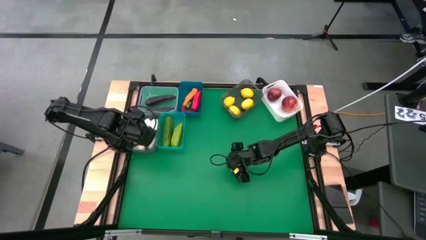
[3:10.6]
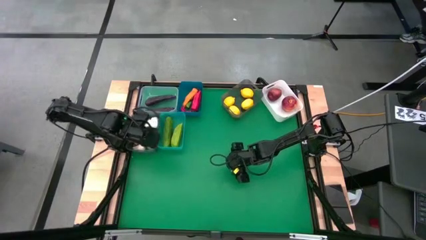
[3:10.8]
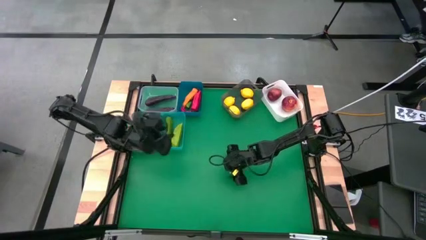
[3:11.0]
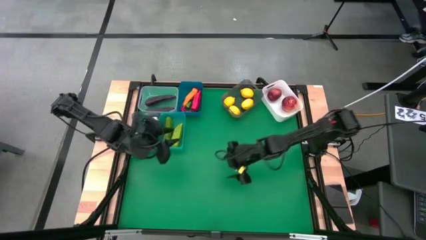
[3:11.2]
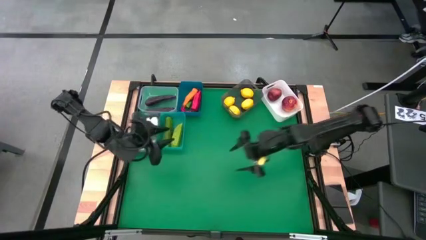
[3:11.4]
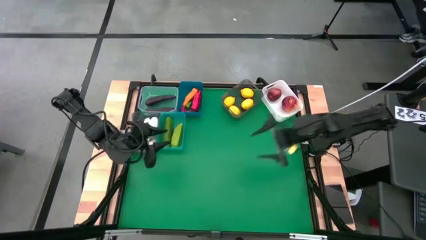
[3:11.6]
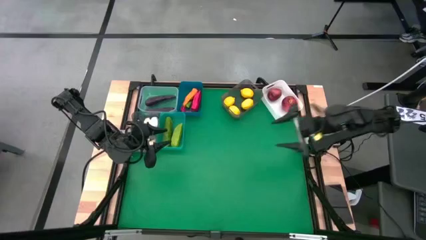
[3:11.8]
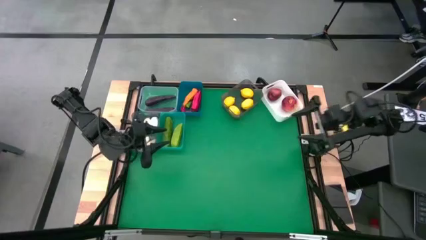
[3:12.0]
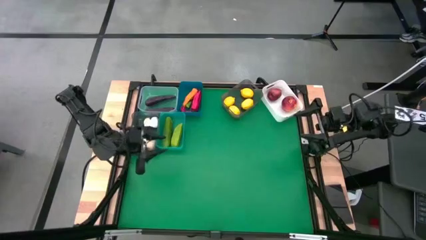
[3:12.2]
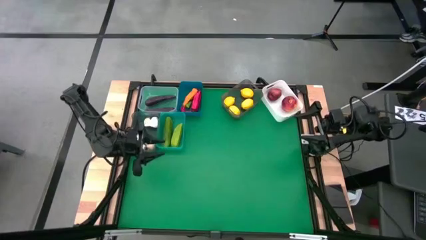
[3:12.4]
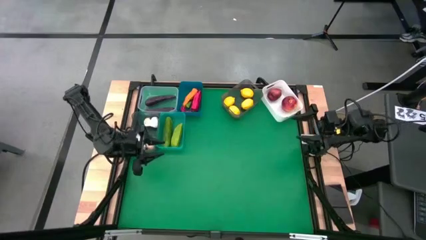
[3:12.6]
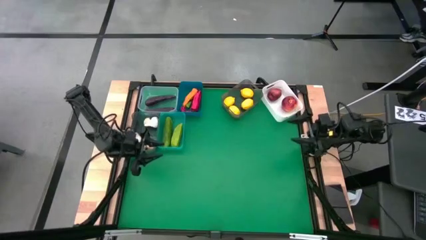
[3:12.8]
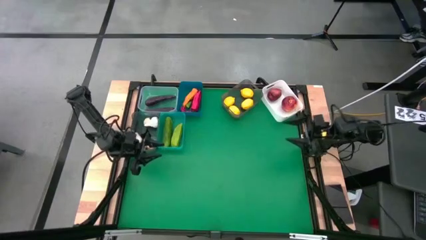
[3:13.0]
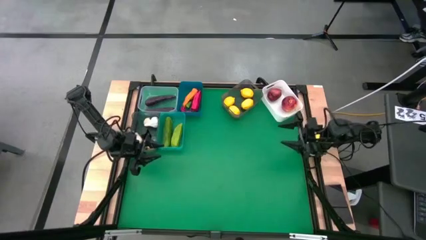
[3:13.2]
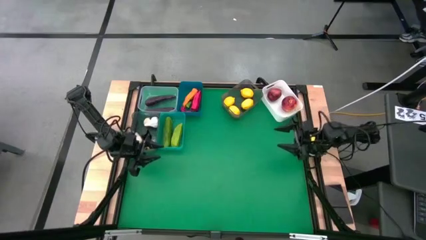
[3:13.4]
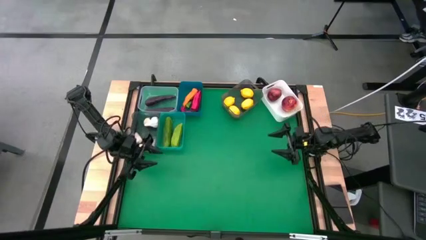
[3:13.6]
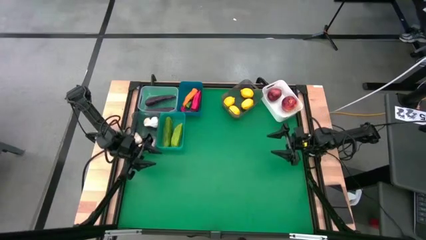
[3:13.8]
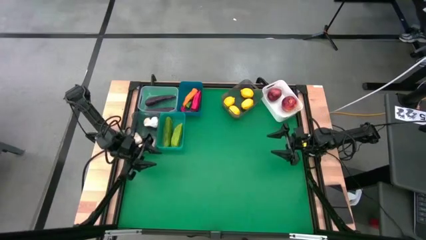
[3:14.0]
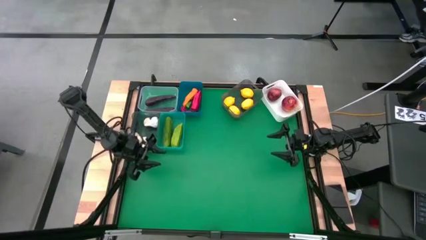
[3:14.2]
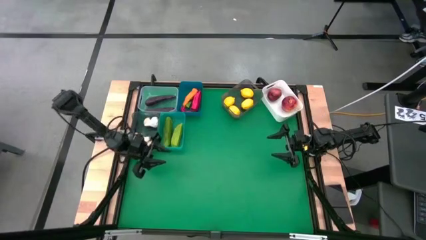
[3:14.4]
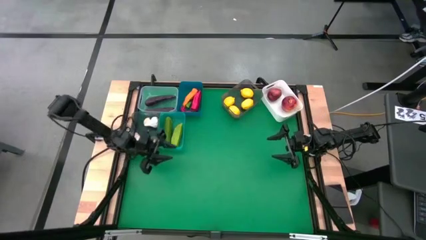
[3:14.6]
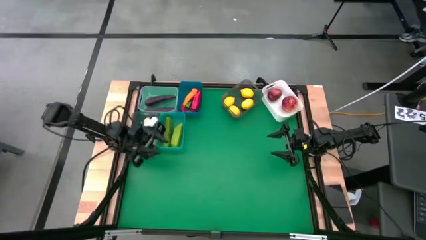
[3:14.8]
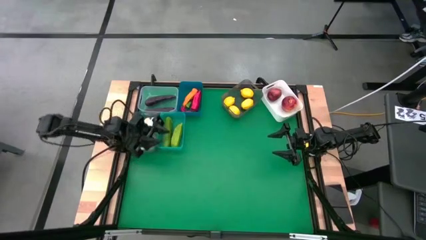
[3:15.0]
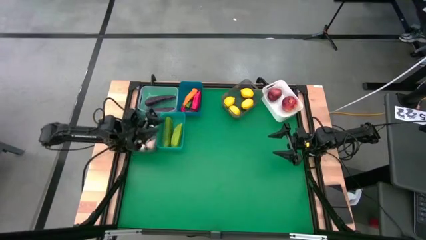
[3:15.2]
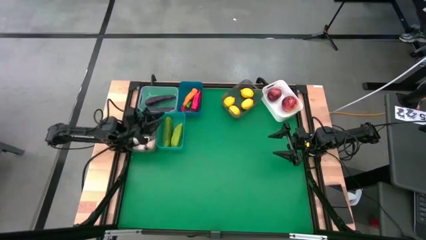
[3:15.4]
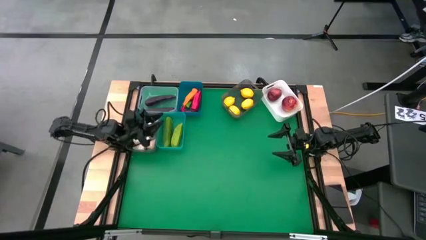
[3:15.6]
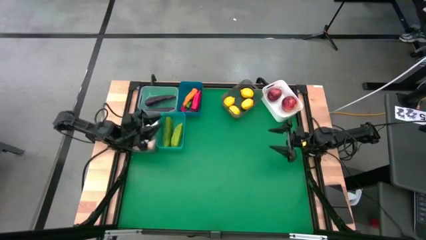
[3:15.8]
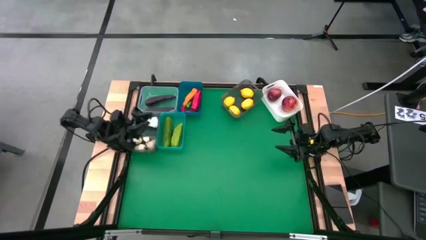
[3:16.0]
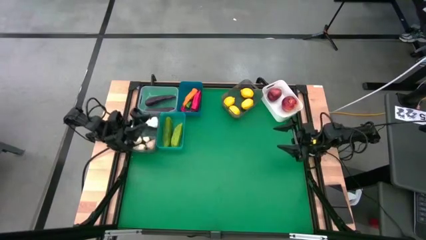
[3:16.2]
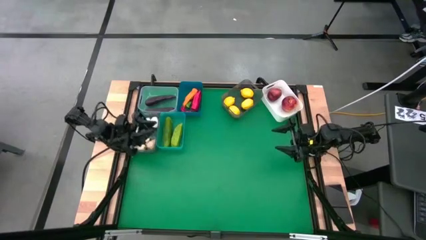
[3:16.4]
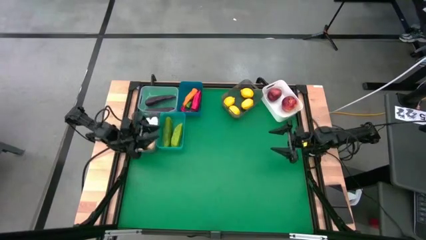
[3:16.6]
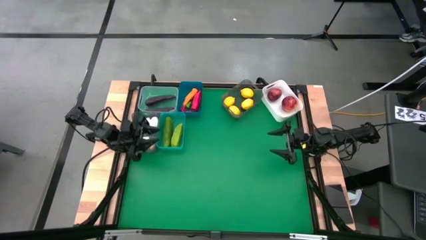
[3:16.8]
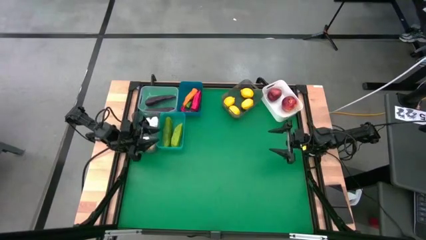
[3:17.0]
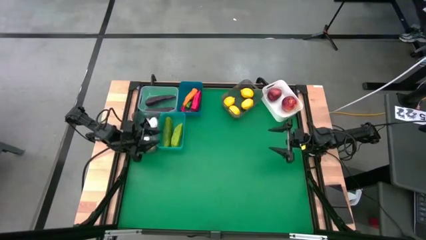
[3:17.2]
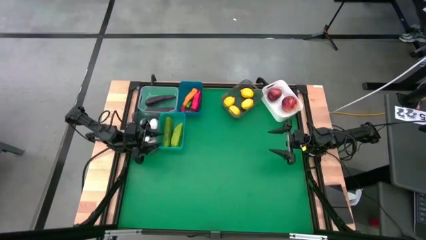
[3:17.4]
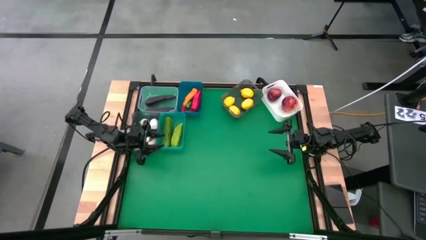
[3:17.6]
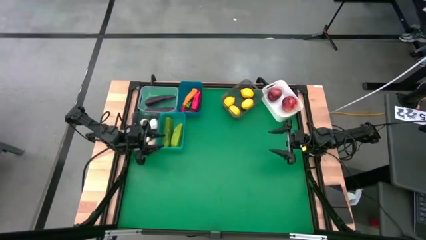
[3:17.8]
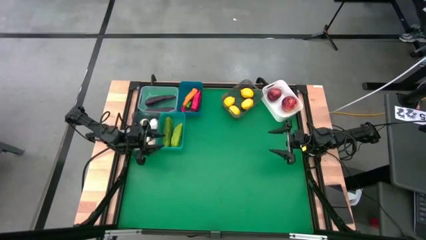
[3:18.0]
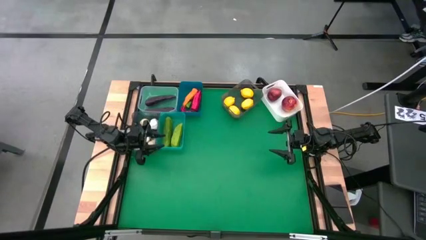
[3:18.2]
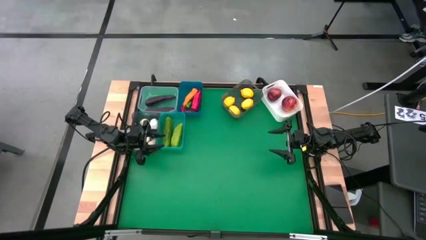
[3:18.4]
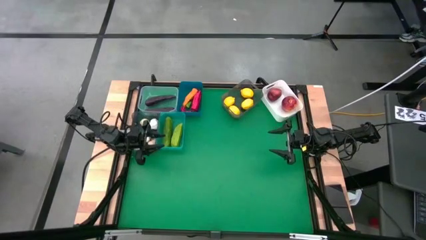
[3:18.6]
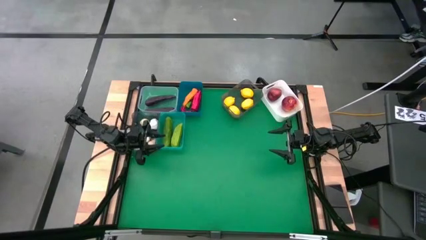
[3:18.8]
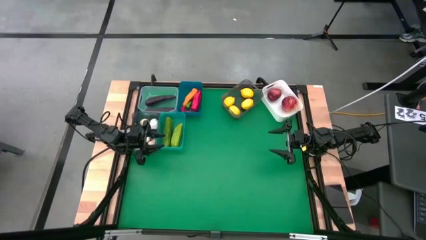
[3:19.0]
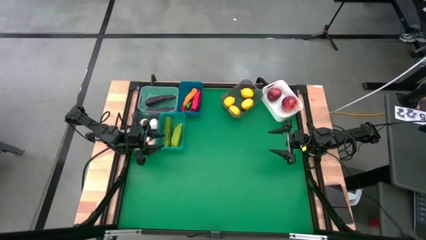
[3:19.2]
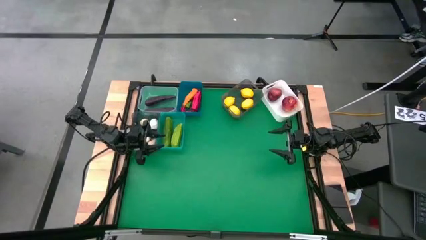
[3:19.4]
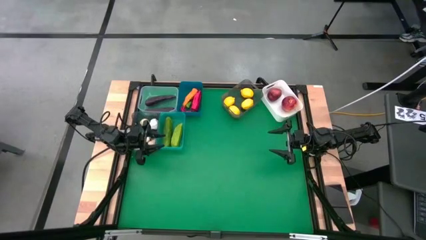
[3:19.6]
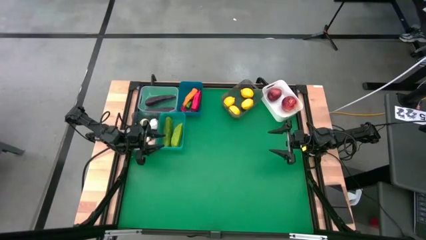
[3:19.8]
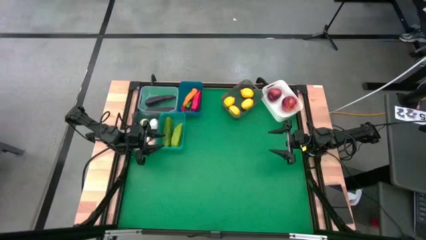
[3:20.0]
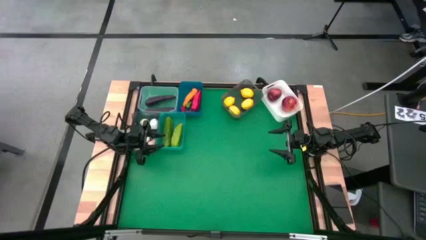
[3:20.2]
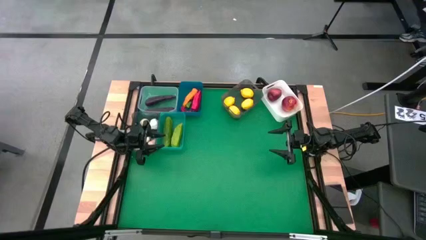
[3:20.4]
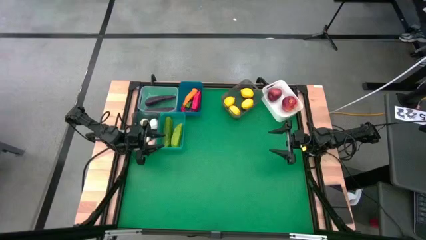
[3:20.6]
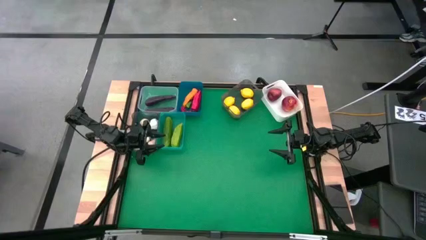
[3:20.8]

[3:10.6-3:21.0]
Task: Sort produce into baskets
Return to Home Position

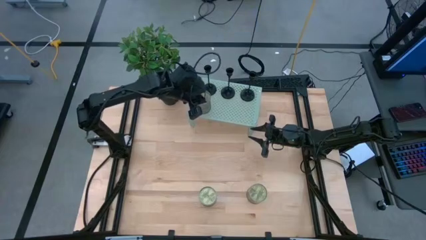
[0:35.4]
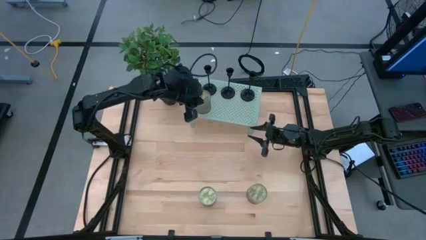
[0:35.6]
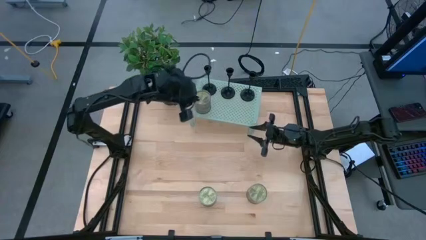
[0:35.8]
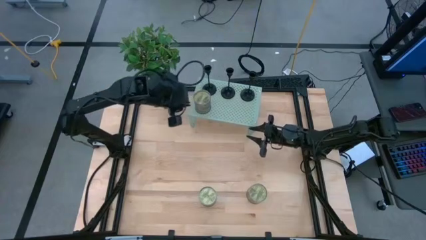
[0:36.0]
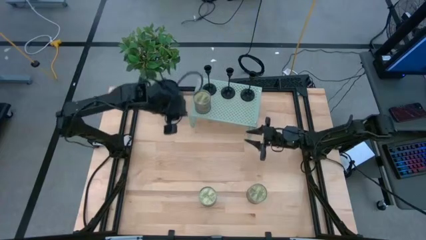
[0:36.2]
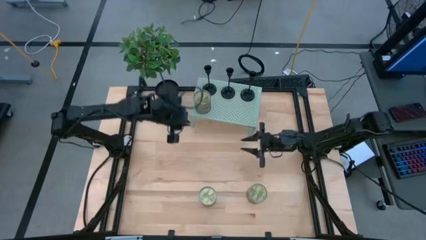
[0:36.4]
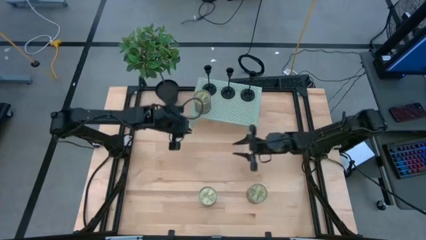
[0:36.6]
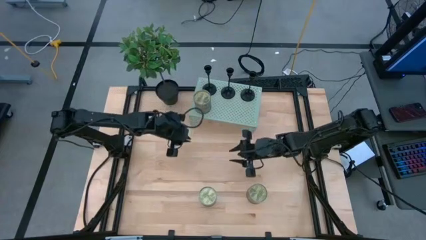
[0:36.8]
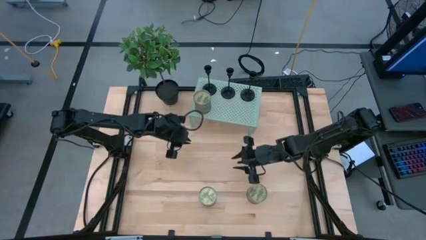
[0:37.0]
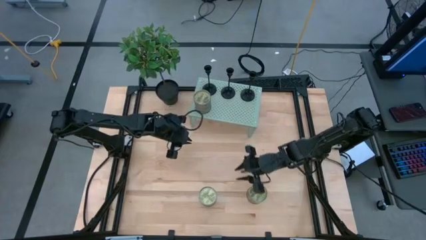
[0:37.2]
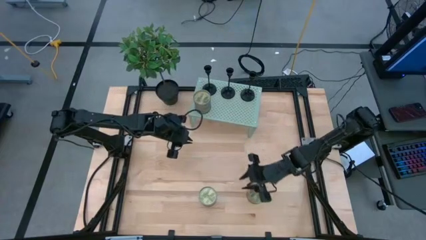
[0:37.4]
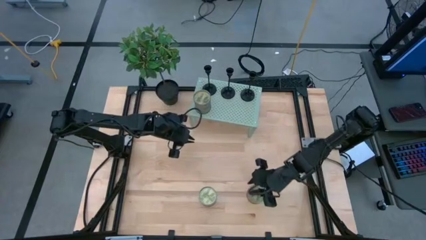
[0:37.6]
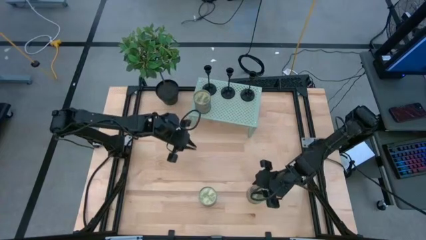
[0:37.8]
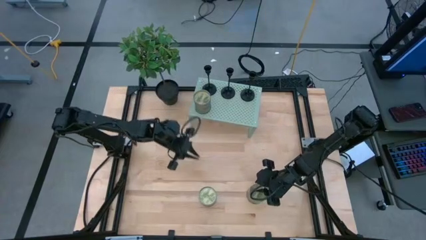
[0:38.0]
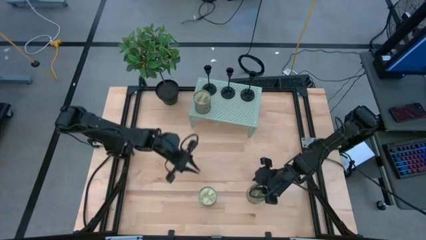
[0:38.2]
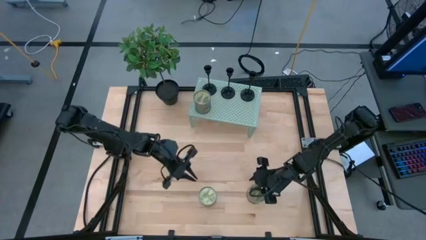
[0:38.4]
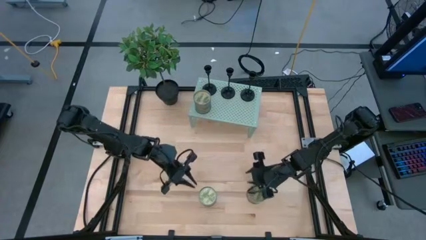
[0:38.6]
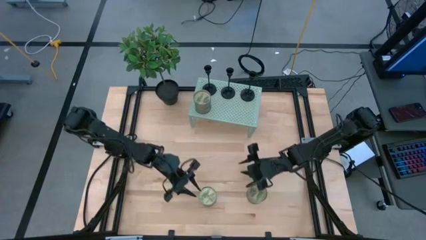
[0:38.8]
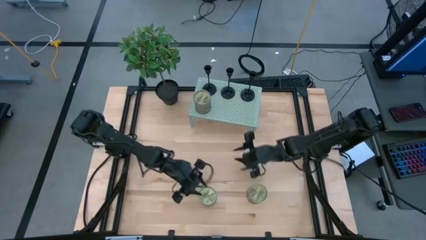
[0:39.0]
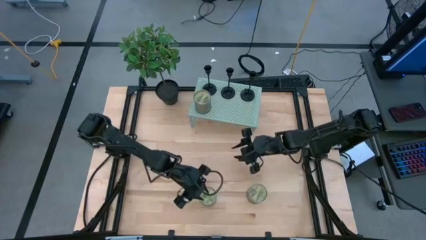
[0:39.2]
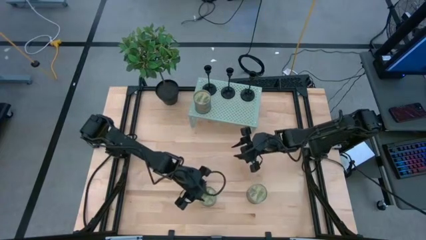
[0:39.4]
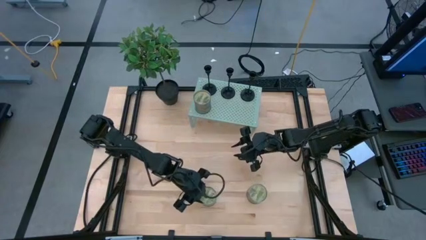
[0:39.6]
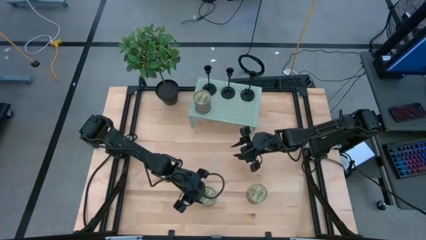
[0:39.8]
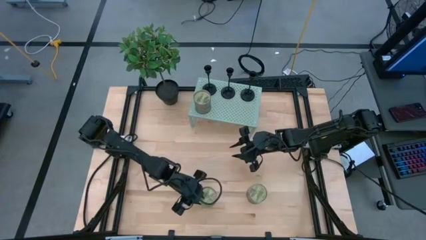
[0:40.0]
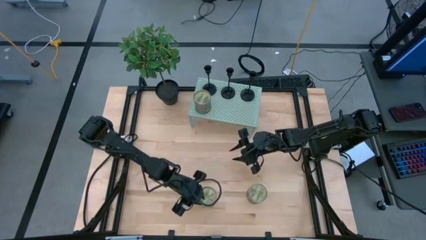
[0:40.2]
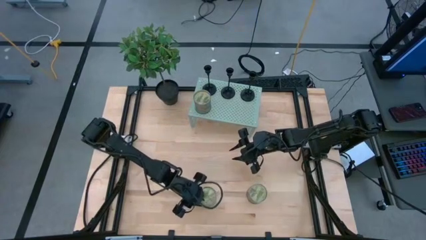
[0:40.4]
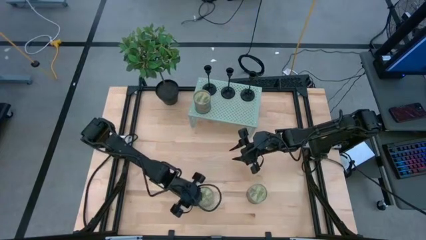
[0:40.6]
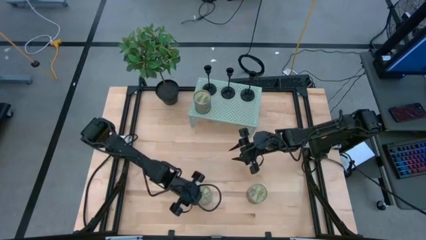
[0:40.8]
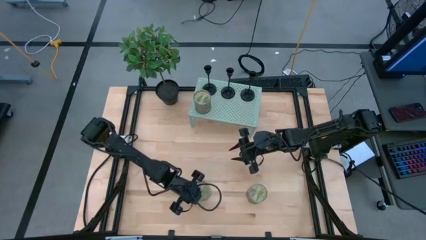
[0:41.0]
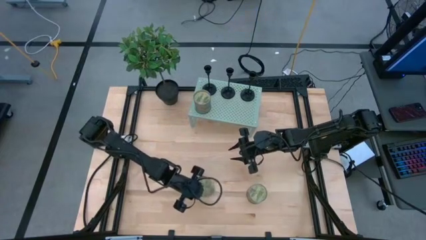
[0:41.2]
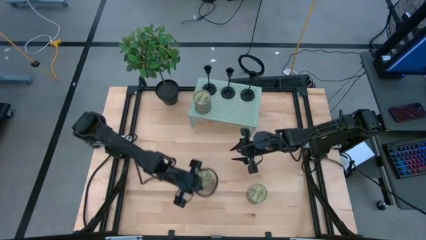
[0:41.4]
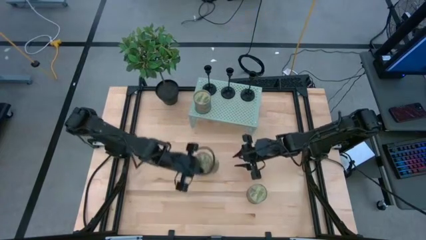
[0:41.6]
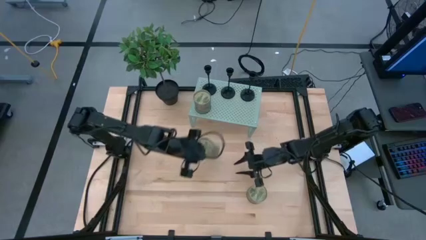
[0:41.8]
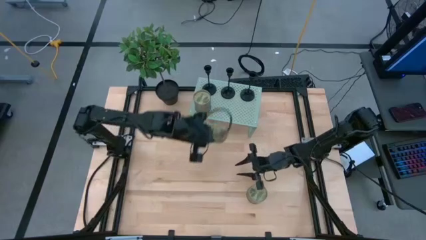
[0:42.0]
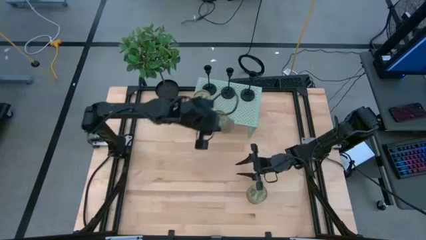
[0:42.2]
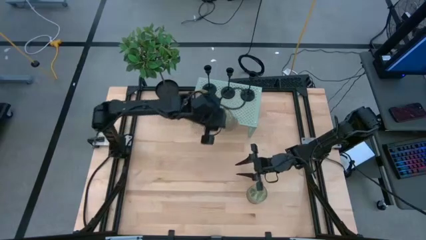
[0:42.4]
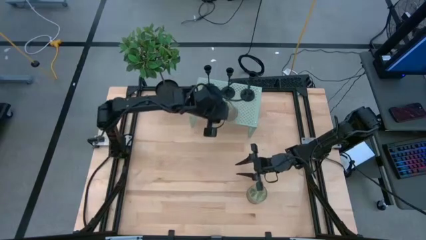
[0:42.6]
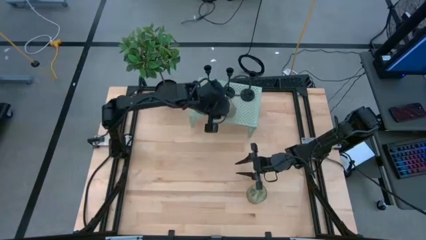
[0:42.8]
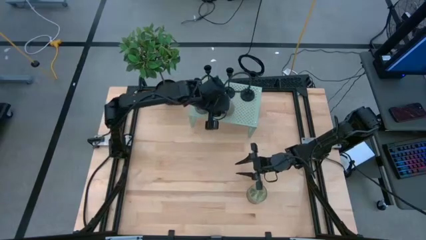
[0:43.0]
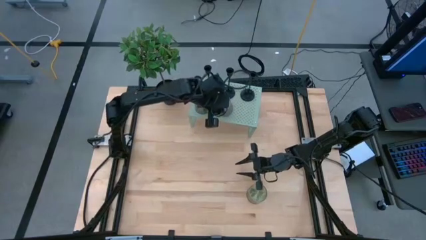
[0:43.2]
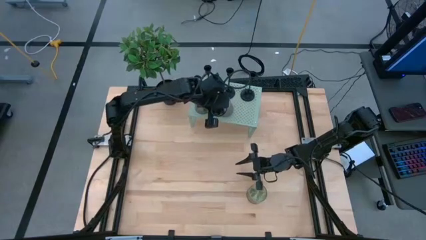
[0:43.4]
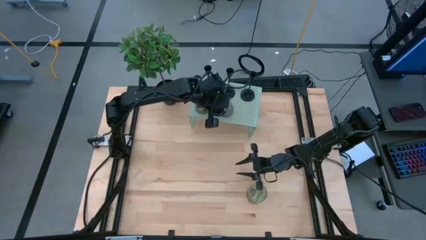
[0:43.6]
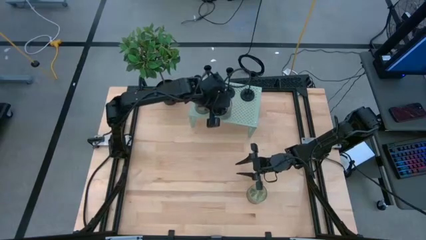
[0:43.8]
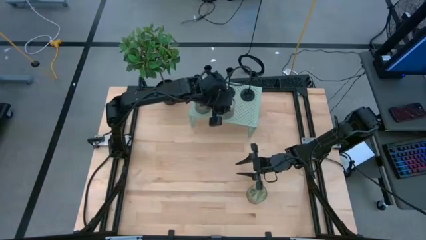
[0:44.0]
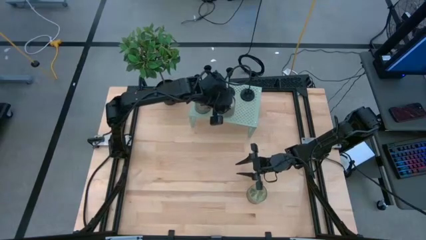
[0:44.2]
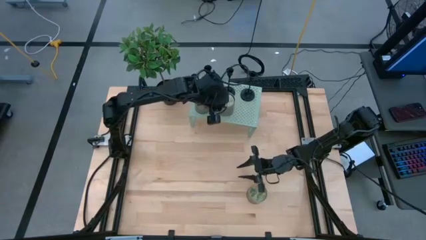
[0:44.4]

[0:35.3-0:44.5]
Task: Pick & Place candle stick holders
Put the left scented candle on the shelf
